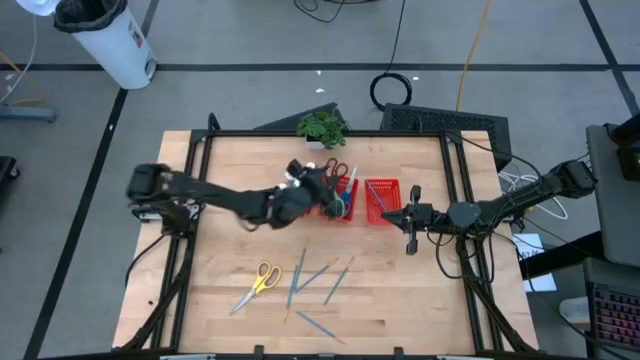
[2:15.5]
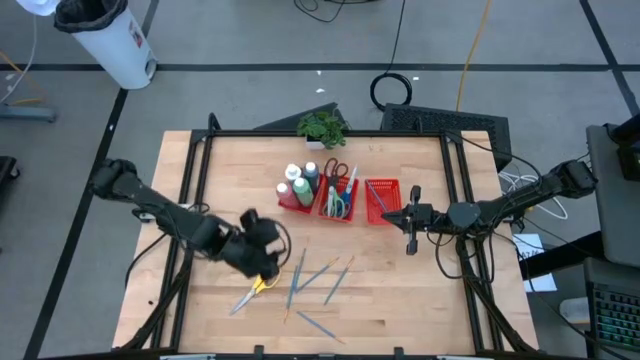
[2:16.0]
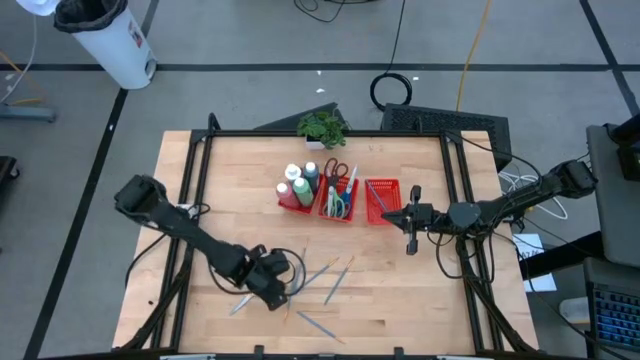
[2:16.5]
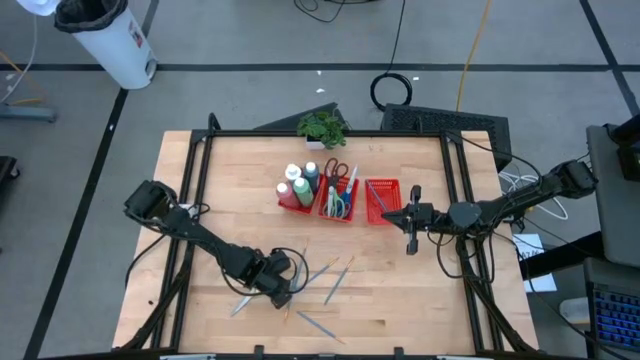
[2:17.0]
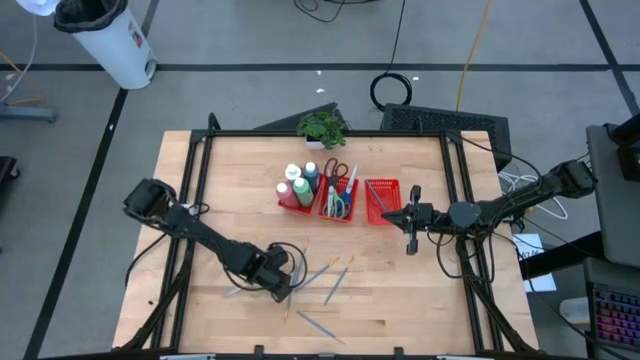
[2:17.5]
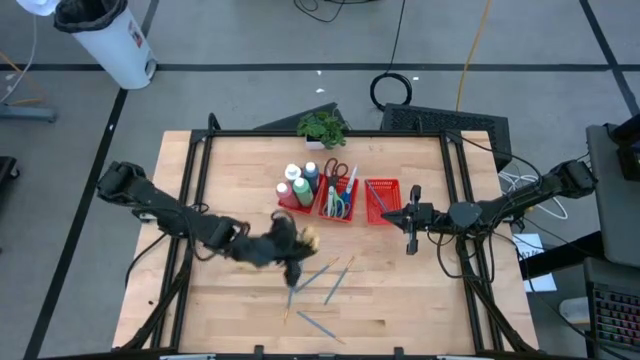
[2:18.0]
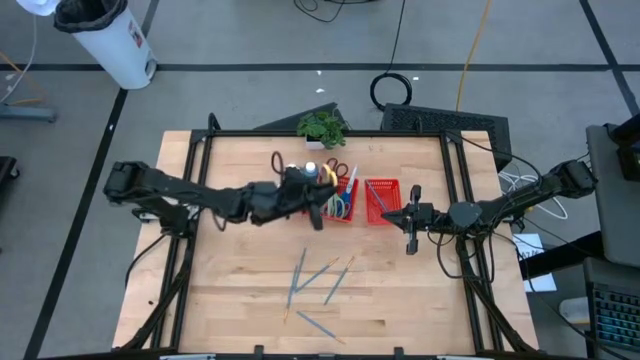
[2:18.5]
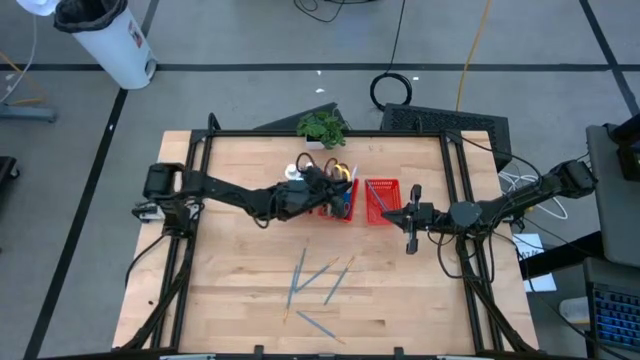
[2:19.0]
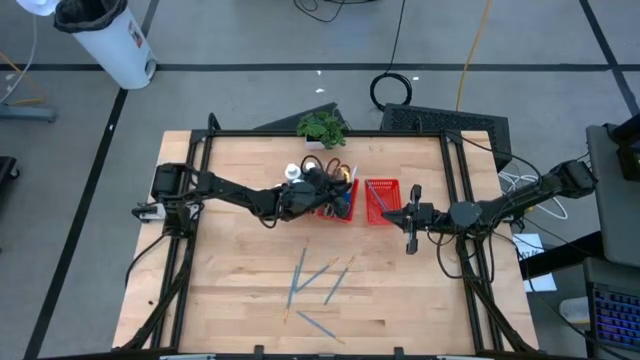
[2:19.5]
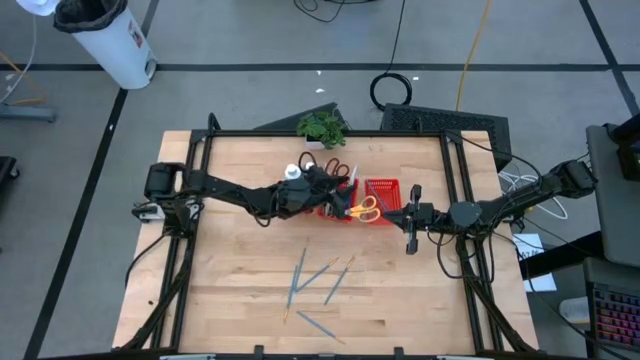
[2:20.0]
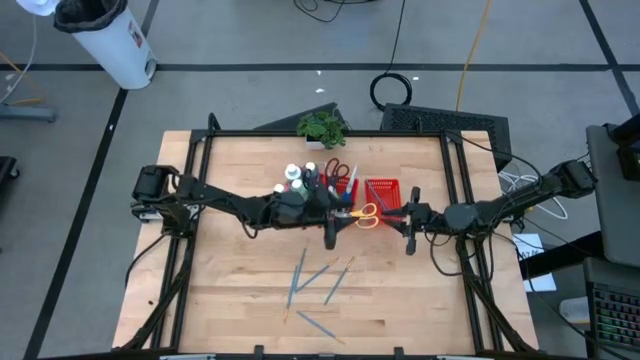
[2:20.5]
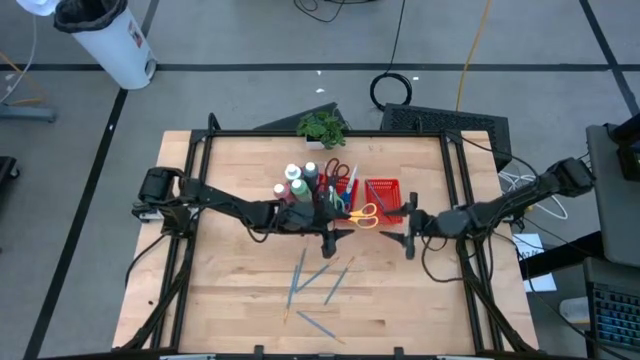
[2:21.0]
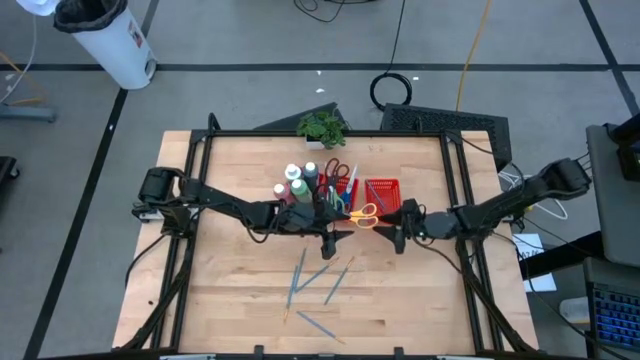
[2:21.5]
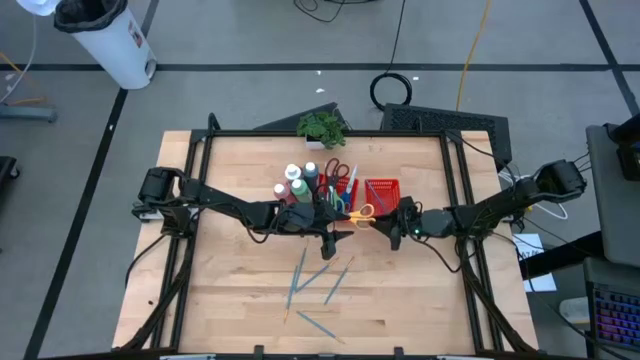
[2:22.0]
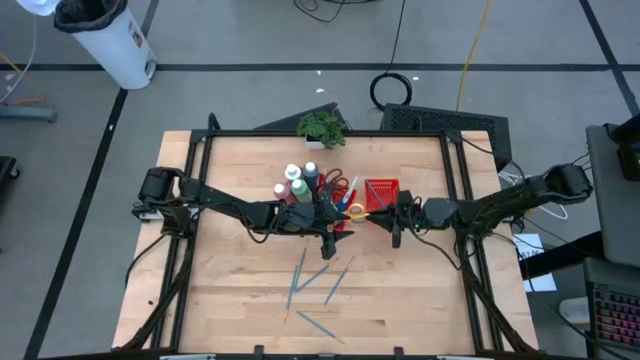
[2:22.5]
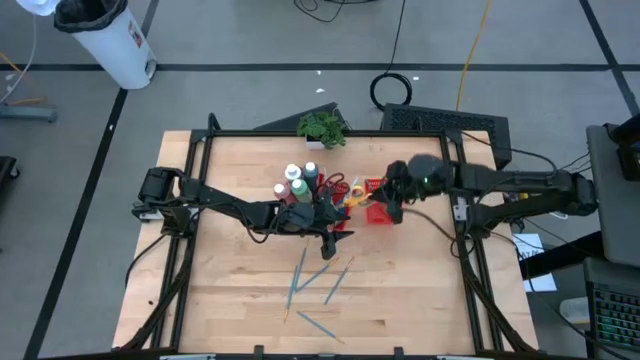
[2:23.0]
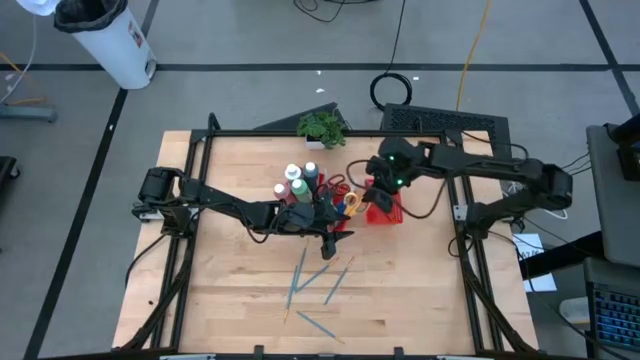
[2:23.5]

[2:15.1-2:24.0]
Task: Pick & Place Paint Supplies
Put the yellow scissors into the middle red bin

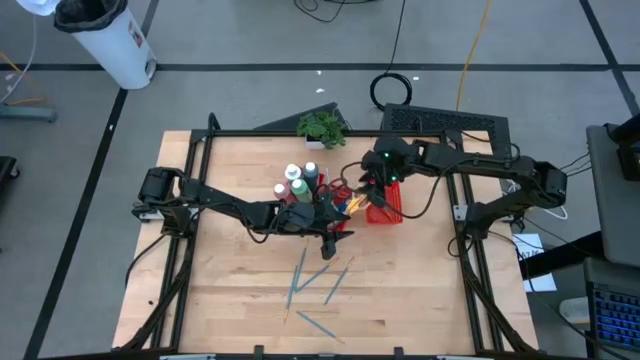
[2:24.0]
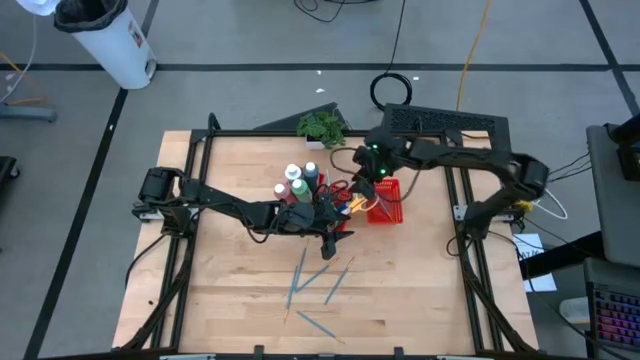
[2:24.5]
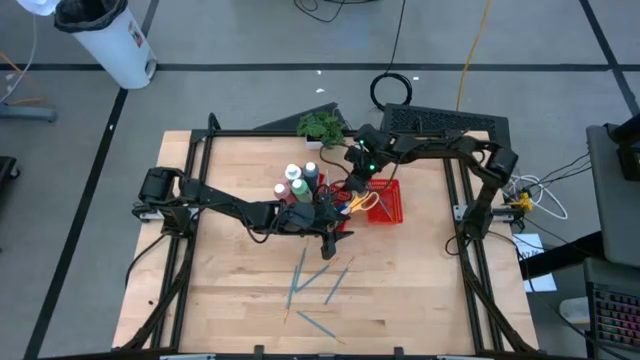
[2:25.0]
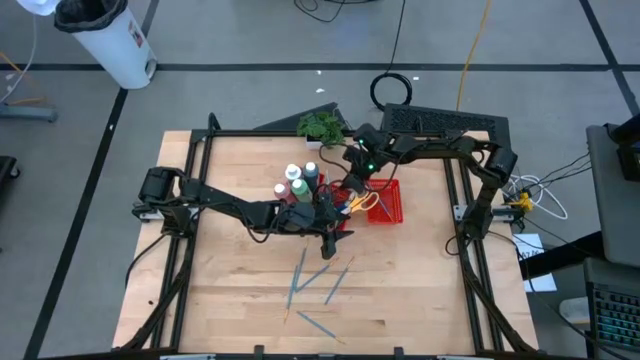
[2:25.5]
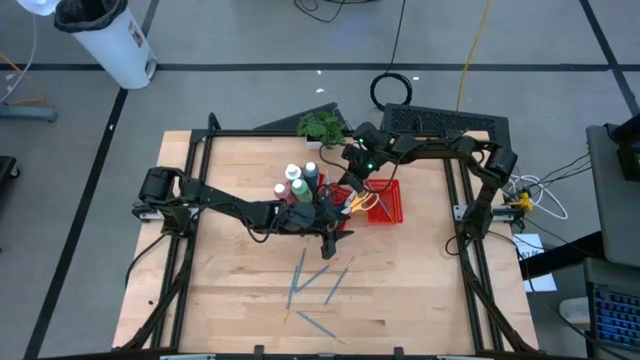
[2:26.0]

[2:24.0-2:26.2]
Adjust the scissors in the middle red bin

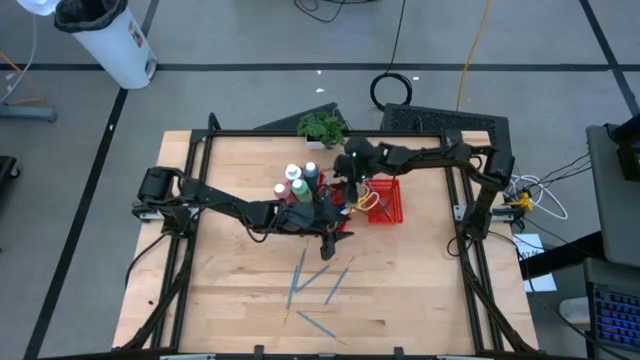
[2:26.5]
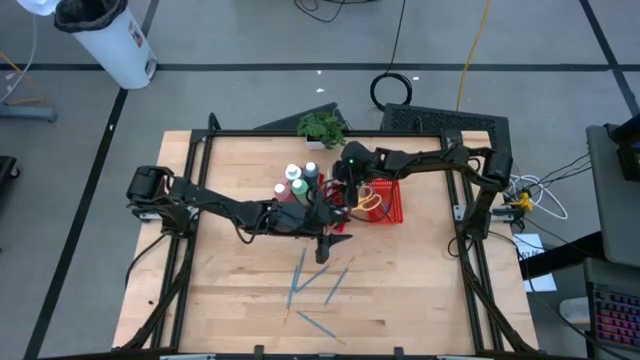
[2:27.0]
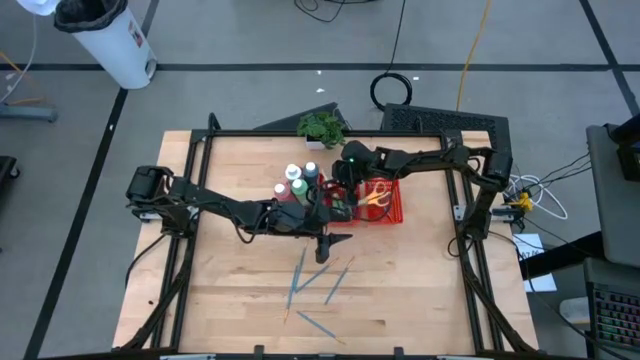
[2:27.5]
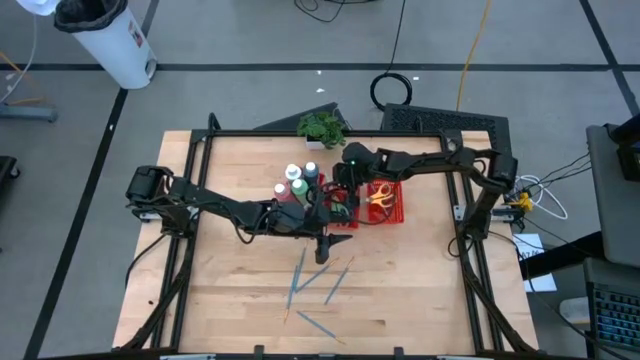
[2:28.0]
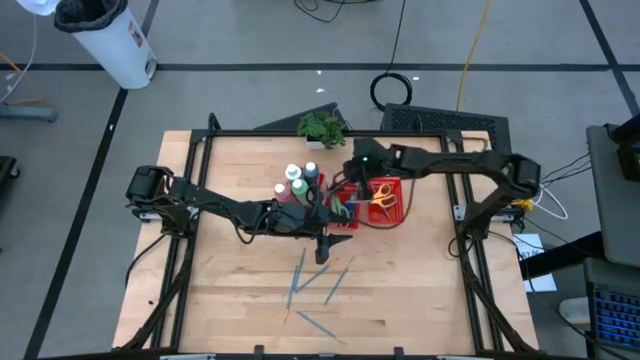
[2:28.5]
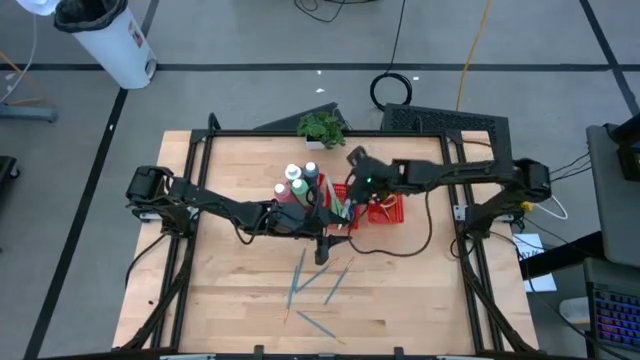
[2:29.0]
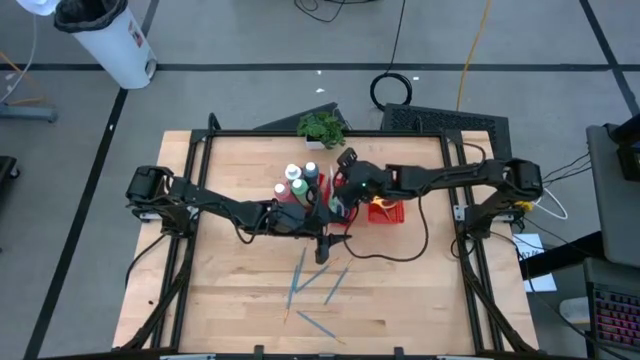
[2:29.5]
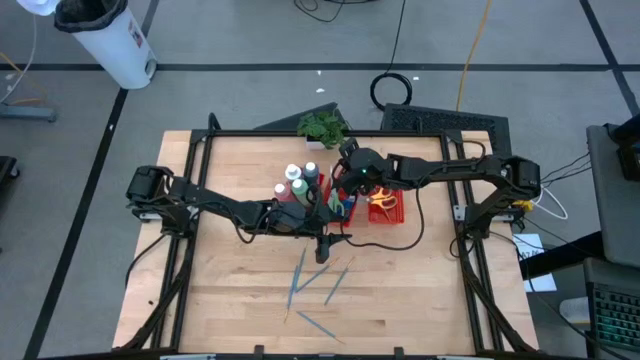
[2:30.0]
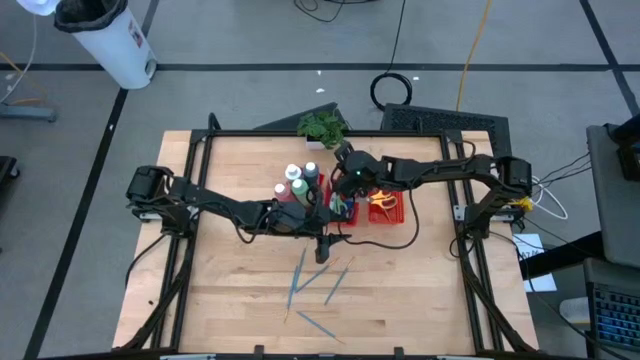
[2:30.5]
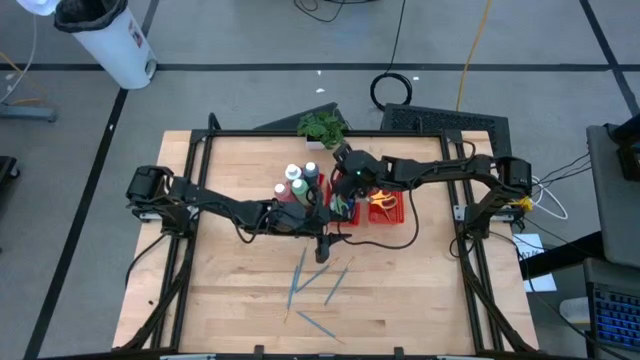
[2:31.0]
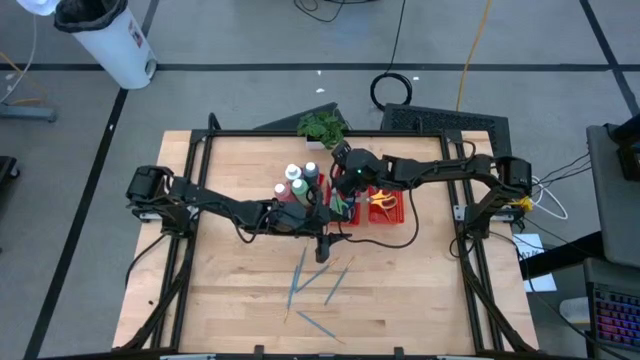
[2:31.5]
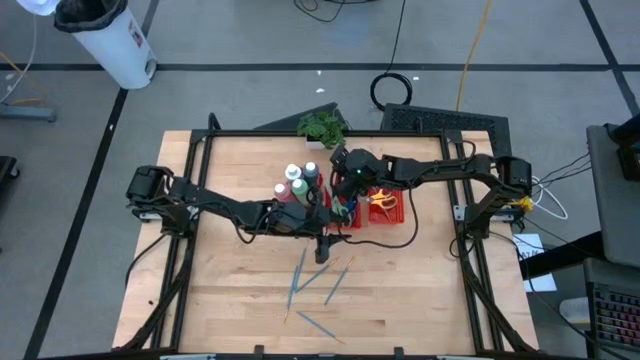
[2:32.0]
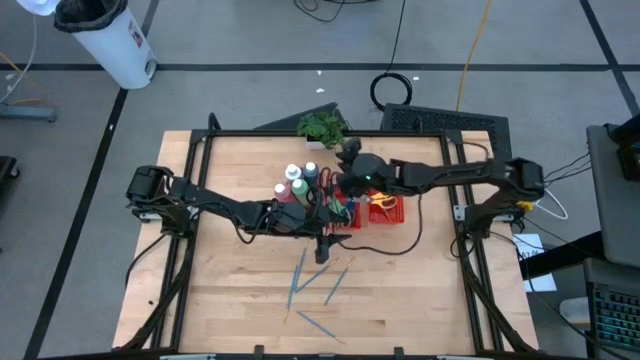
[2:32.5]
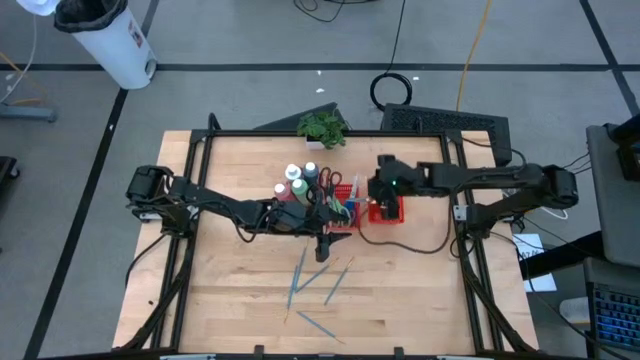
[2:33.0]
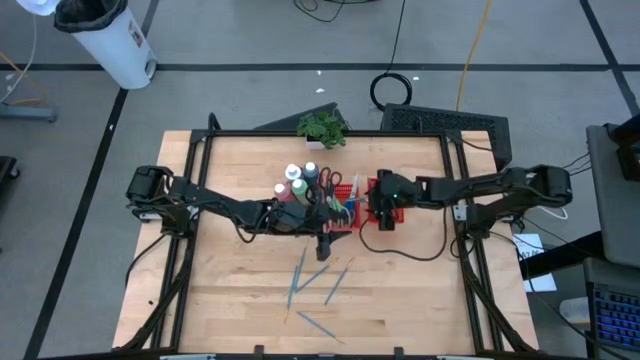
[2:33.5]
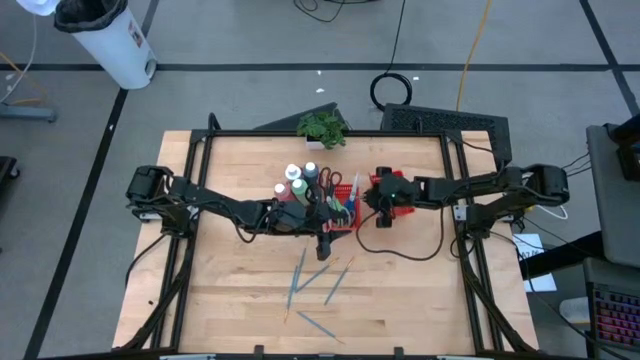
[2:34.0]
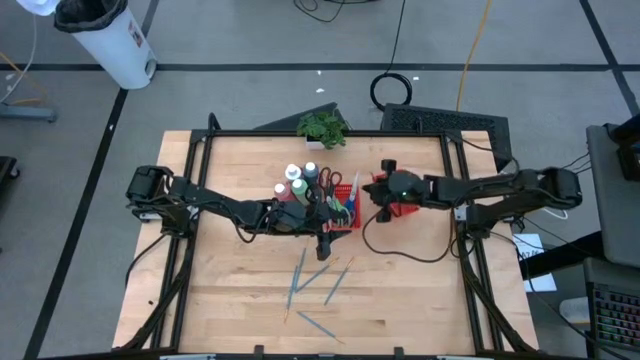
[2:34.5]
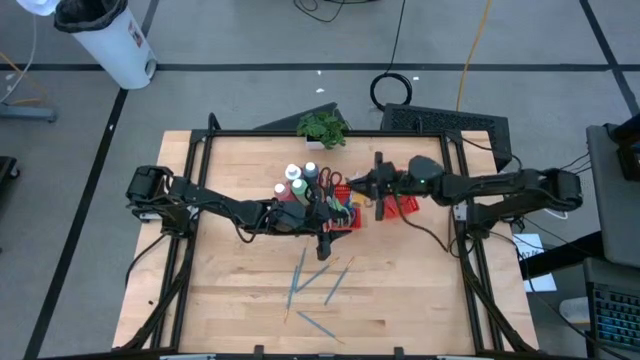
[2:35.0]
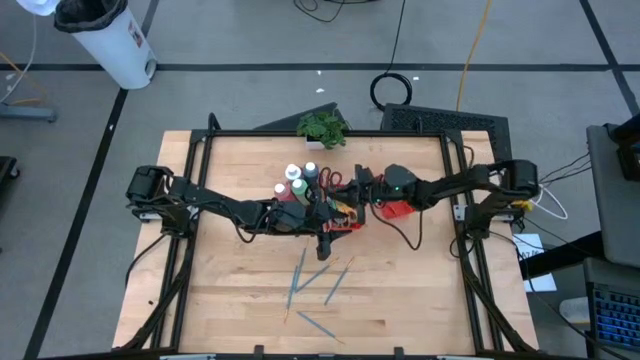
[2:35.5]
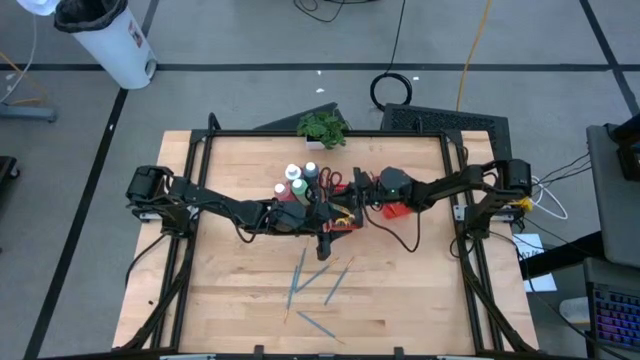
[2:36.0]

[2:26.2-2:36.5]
Adjust the scissors in the middle red bin

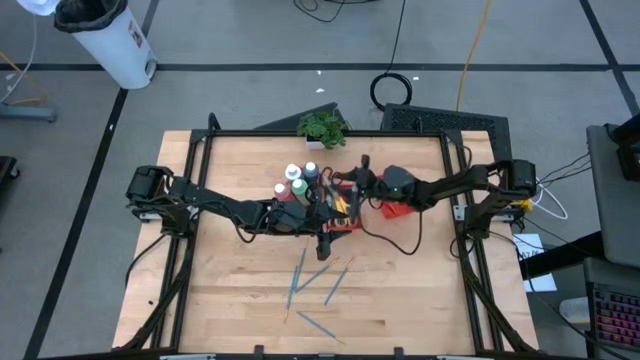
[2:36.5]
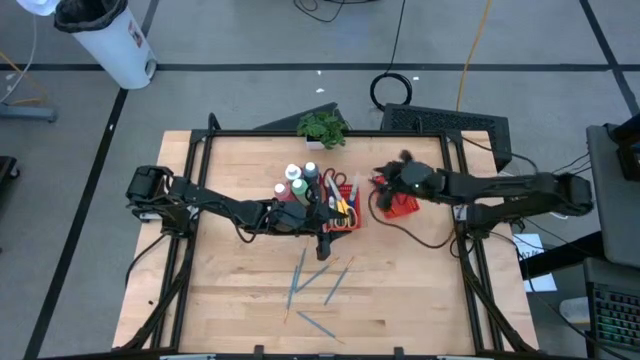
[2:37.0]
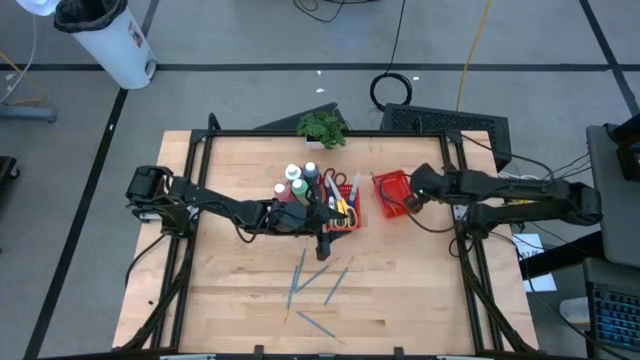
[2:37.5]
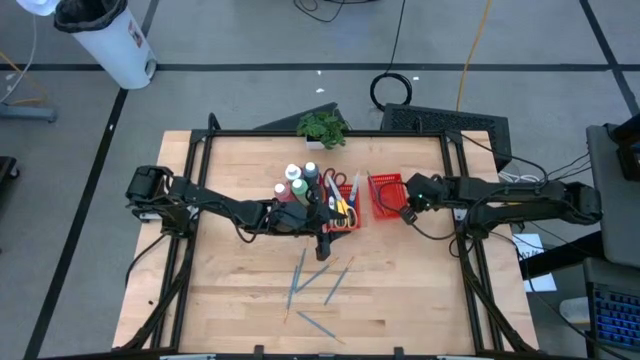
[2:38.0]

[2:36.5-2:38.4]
Adjust the right red bin on the table
